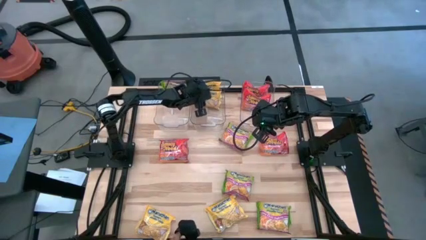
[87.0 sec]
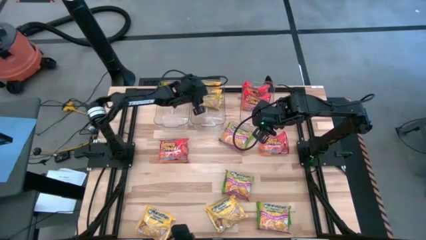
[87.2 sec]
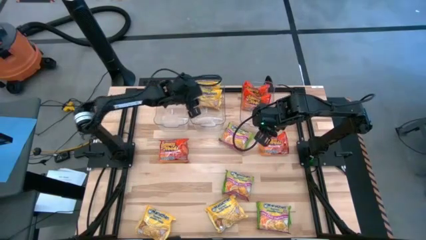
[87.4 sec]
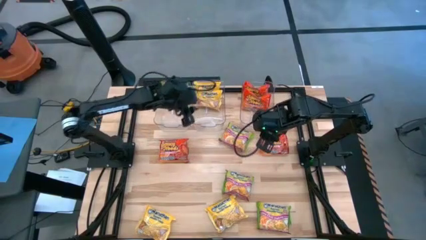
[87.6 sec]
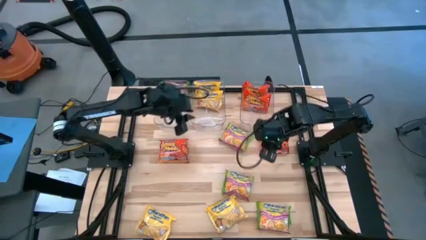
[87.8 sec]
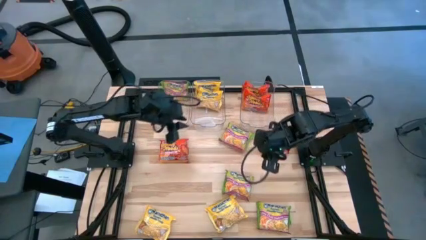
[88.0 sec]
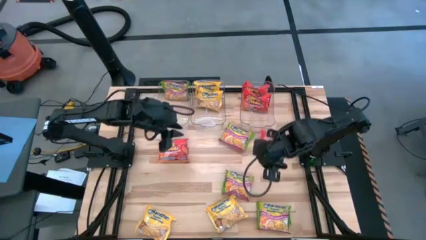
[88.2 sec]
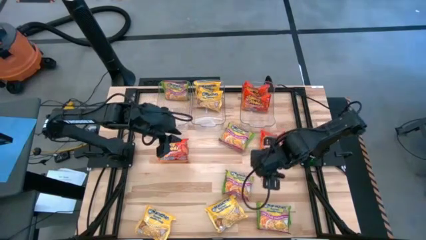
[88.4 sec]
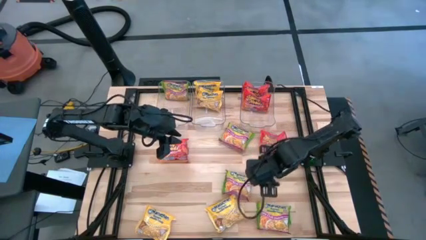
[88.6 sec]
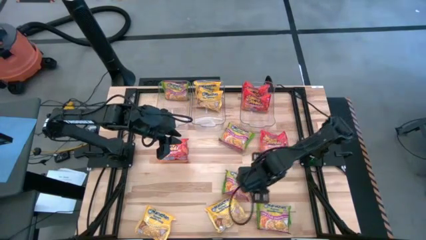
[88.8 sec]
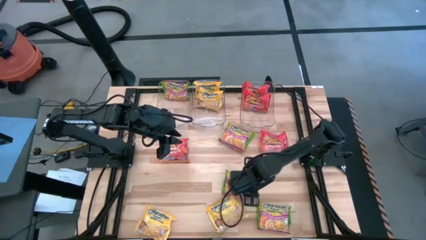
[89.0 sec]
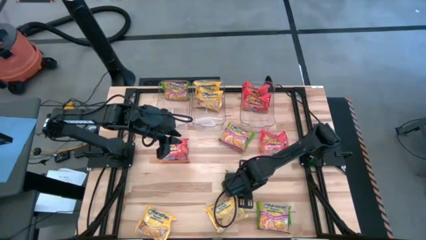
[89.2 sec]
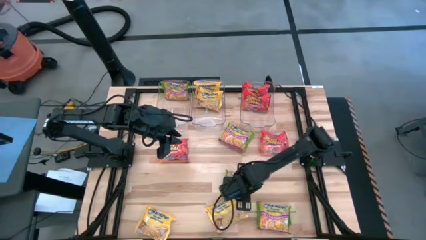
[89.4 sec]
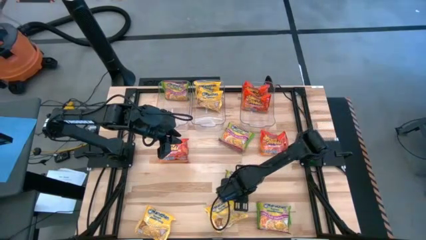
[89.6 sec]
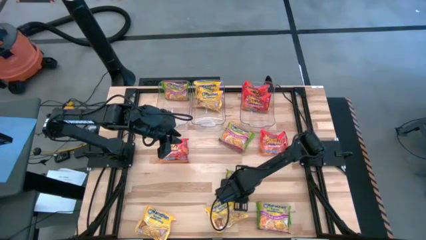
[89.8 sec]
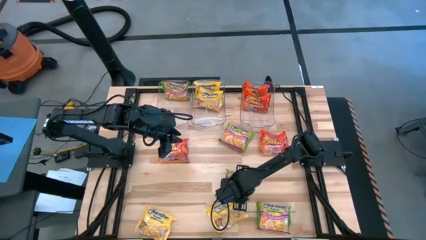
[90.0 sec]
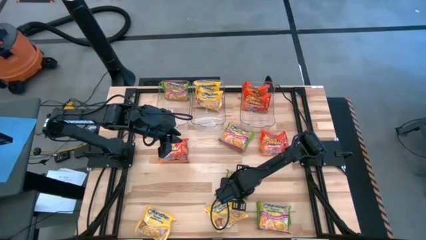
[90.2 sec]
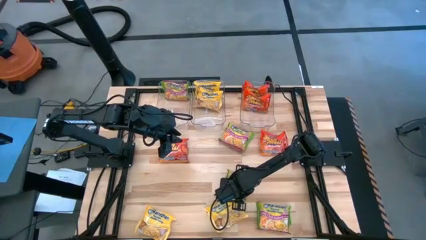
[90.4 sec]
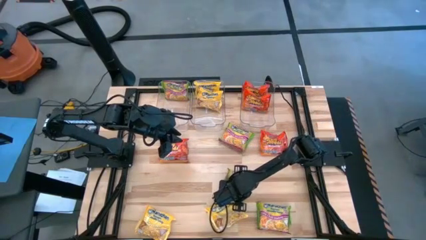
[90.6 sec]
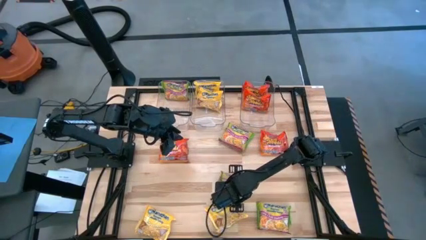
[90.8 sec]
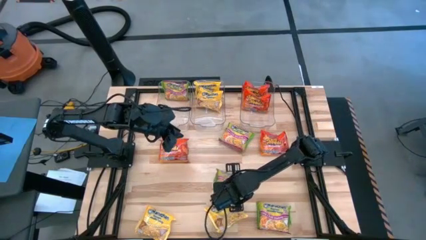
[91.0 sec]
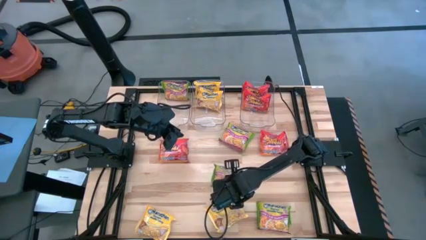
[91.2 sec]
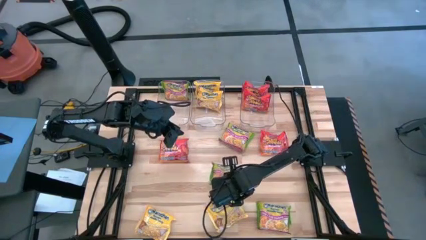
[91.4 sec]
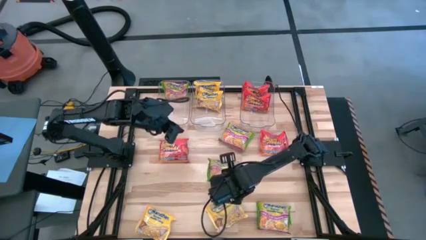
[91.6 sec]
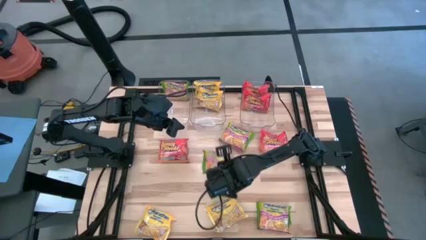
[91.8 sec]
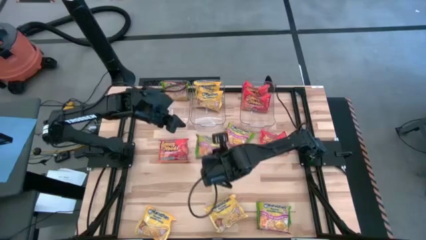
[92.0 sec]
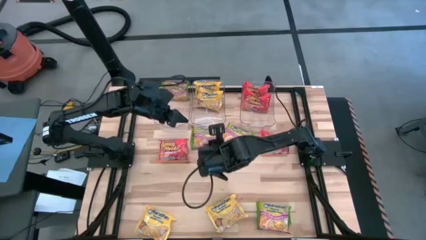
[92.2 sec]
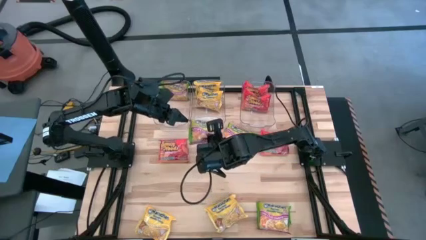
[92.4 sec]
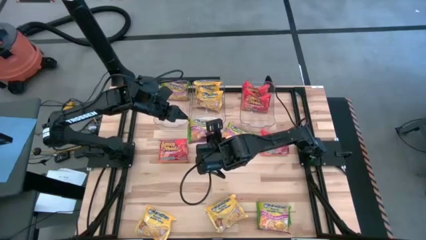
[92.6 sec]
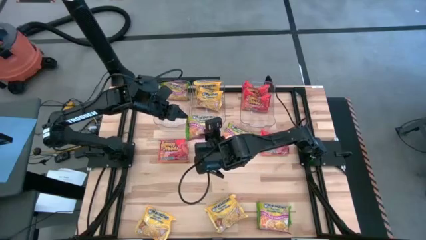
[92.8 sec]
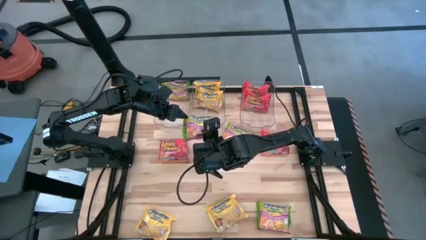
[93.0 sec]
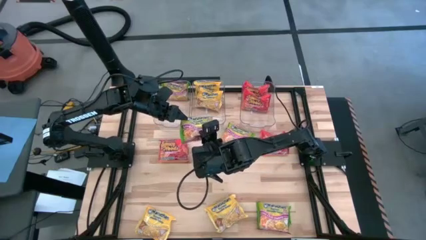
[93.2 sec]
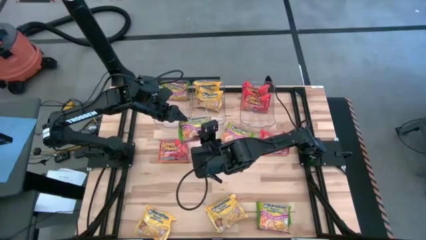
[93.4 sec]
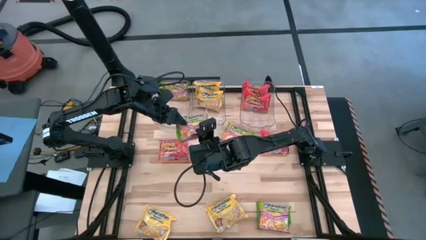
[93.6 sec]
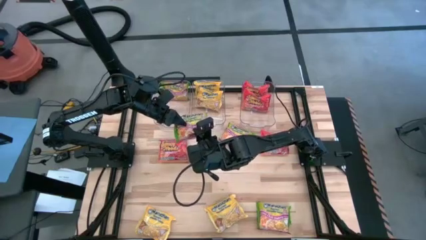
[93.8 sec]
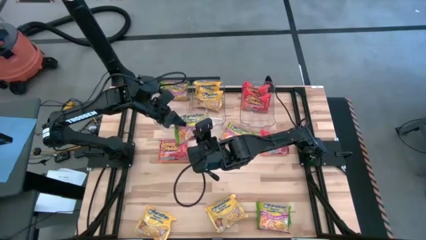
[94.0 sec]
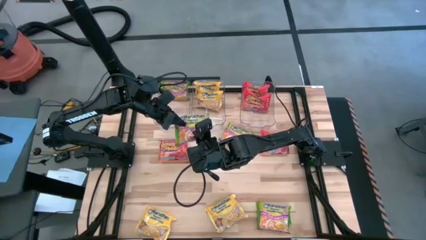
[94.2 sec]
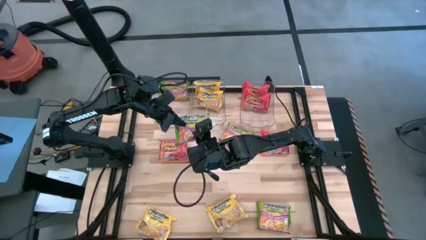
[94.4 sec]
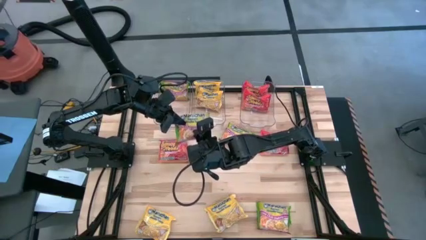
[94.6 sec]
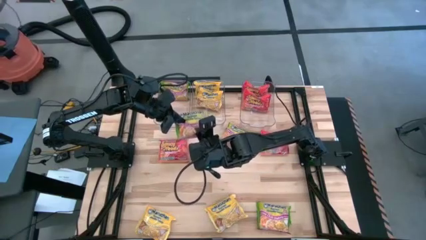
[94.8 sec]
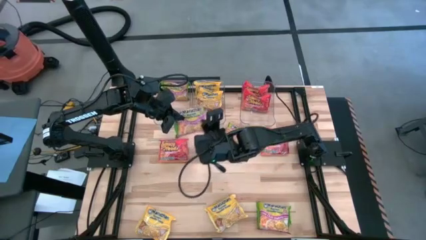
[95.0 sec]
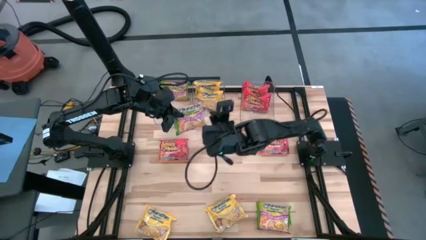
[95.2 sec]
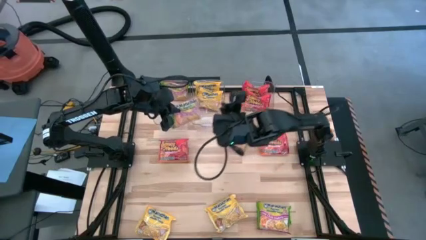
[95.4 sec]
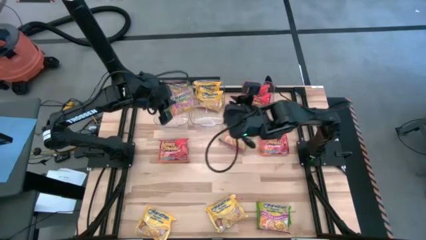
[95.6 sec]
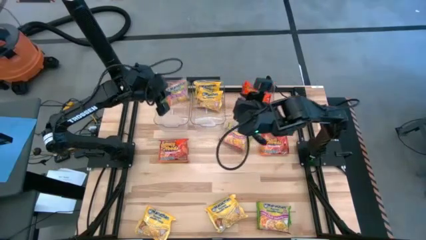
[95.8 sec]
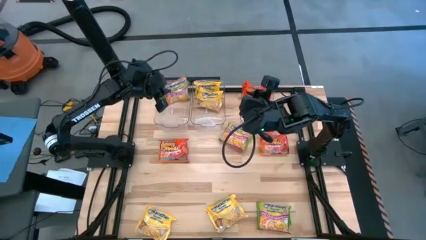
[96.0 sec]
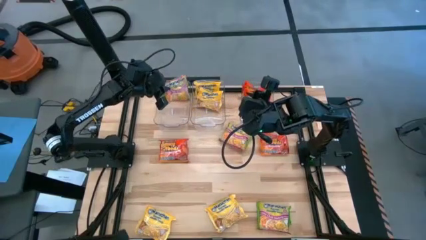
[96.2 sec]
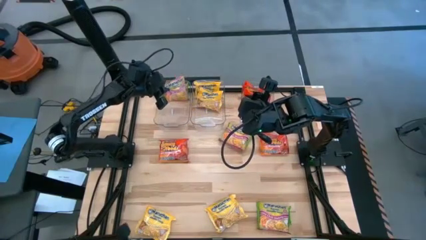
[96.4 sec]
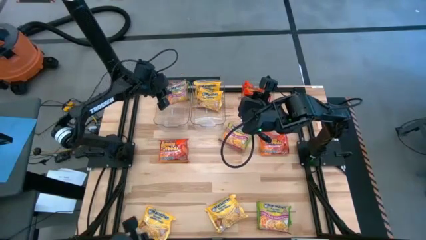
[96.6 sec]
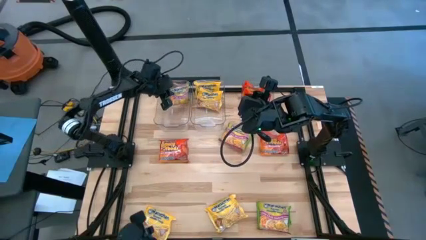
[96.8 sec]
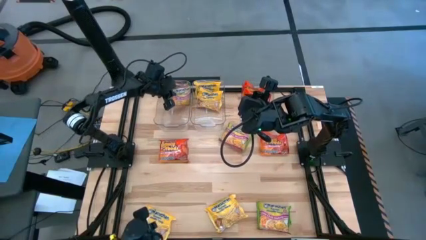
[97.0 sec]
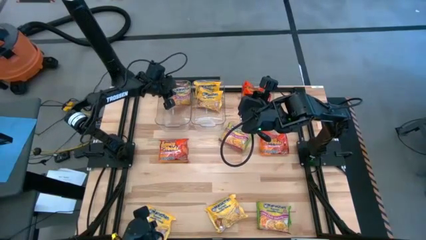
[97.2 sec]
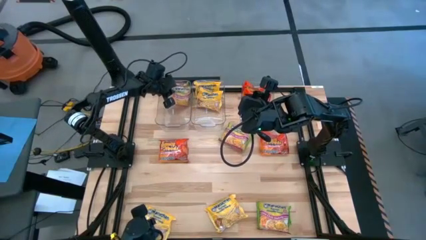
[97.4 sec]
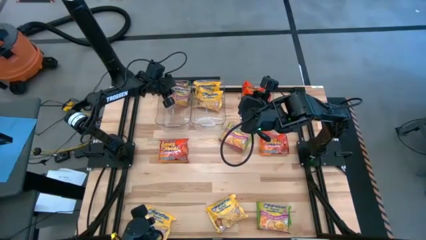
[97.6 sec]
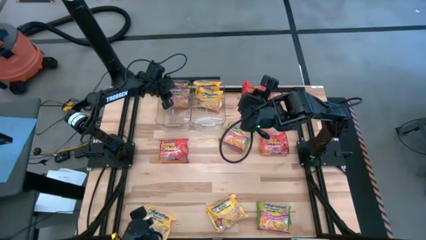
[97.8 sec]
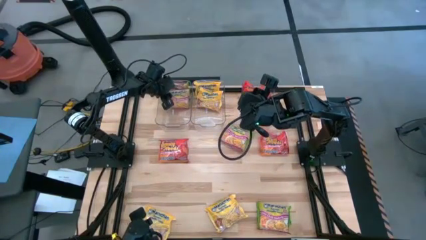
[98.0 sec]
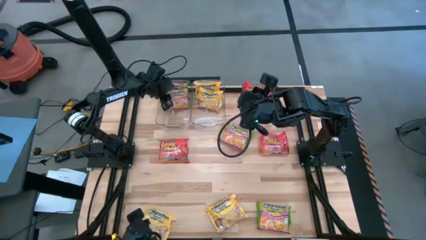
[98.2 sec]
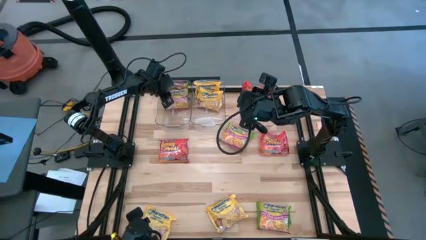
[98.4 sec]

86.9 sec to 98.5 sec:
Task: Sort Maruchan noodles
Put the green noodle pack into the left transparent bin
